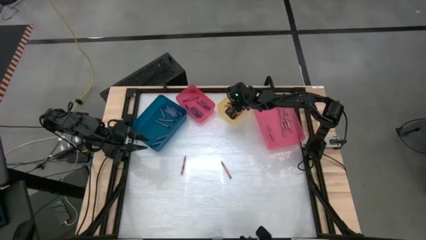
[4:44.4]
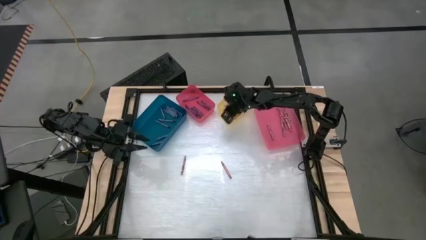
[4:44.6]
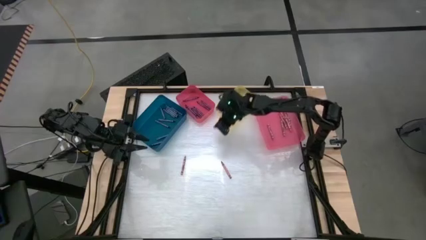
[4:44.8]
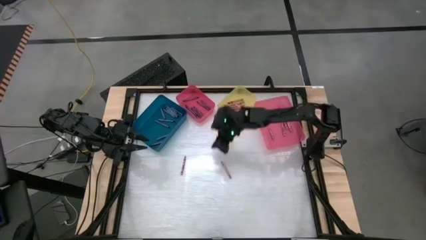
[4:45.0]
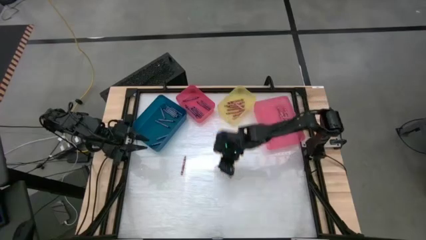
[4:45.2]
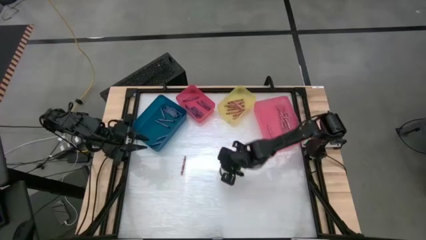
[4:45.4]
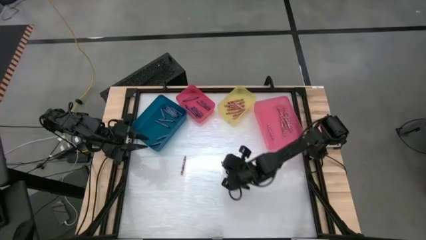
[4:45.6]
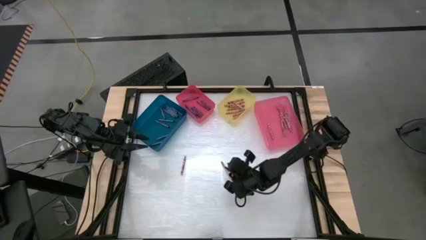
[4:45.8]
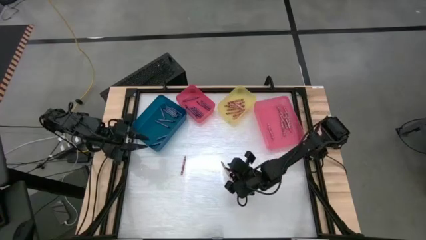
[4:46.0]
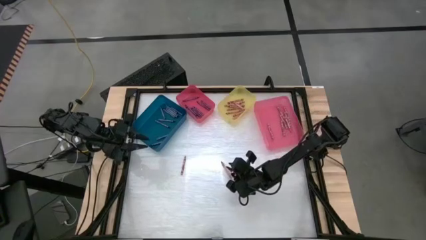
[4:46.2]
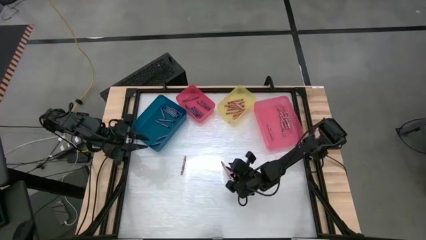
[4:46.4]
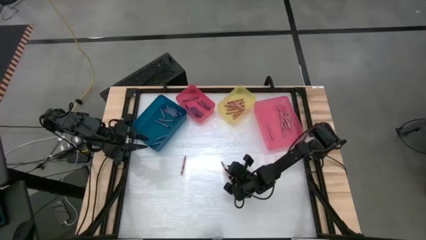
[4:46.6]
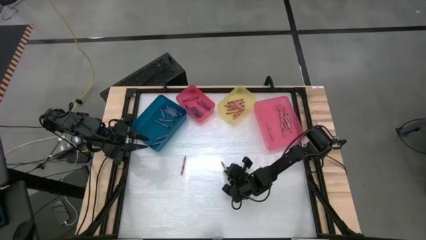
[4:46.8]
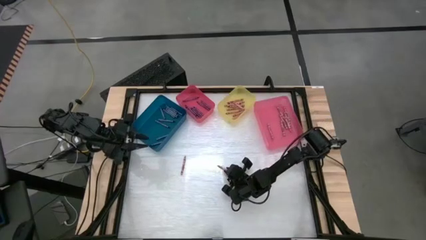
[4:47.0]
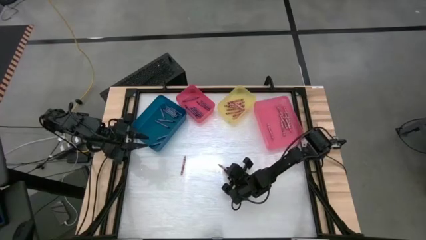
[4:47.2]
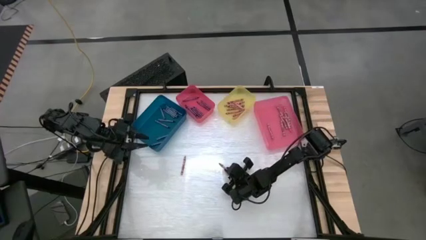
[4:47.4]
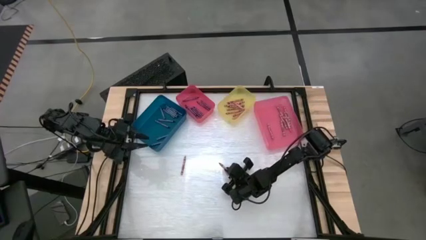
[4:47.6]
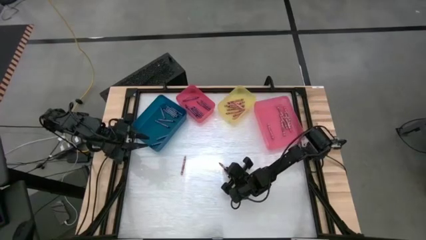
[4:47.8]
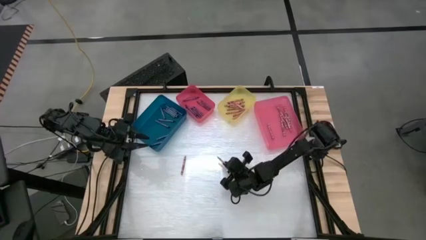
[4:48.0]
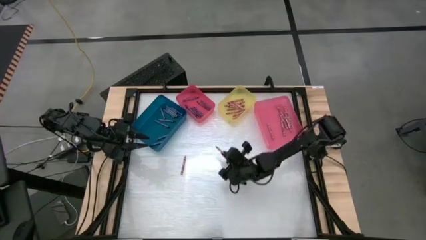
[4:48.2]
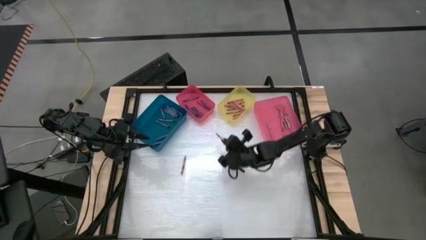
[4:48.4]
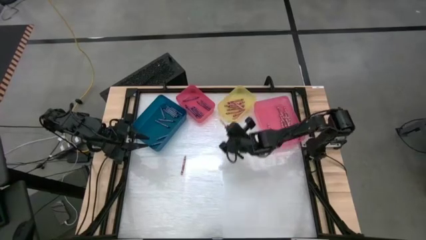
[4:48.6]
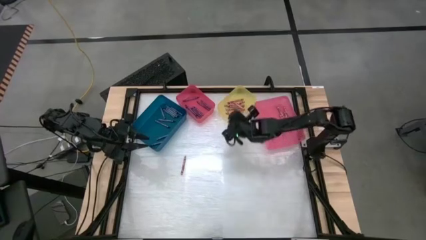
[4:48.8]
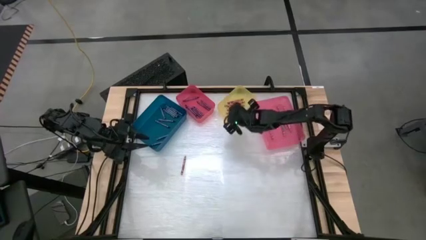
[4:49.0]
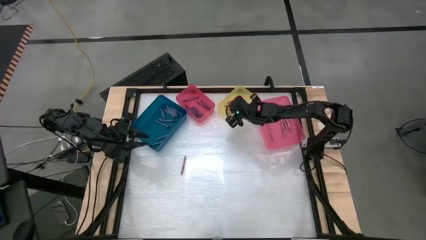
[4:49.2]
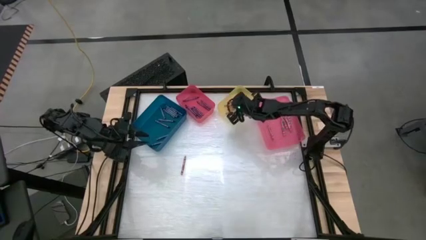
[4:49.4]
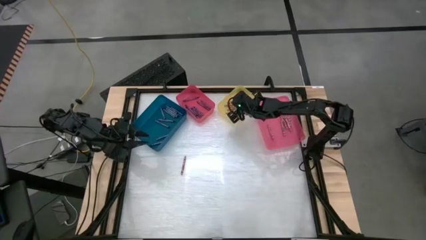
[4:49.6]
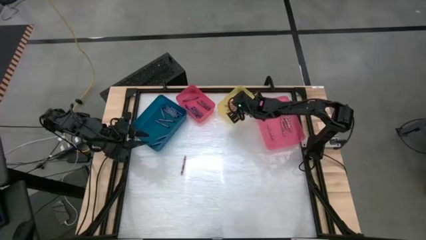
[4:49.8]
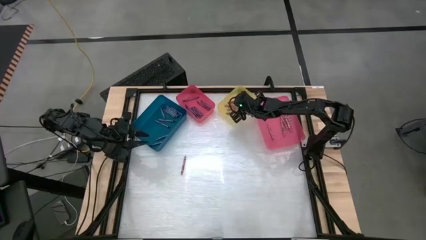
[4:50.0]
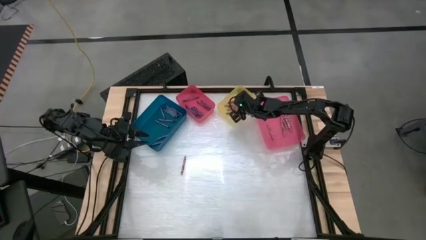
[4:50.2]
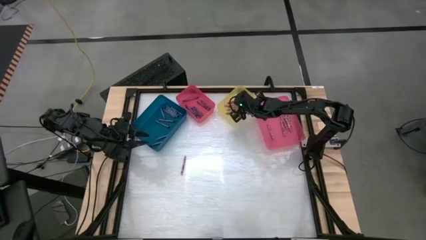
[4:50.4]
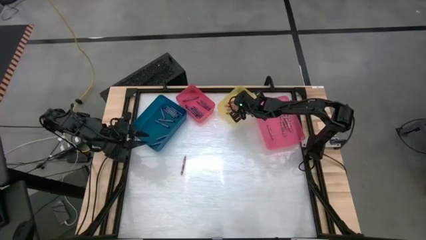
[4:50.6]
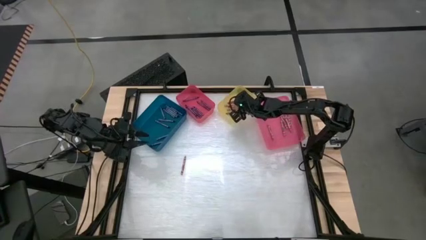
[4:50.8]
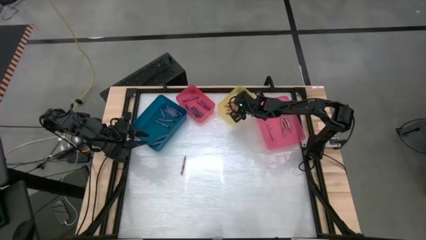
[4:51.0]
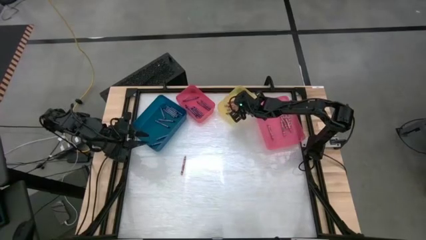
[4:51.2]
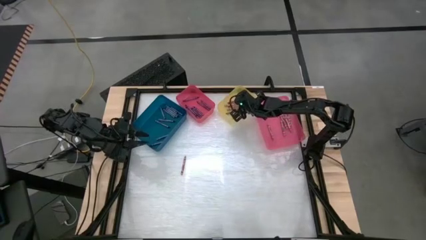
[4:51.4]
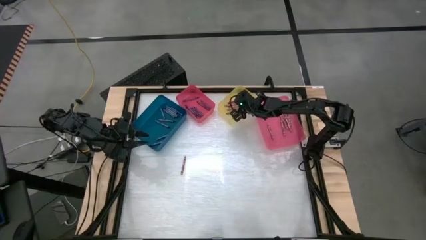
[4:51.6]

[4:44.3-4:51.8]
Task: Sort crayons
Put the red crayon into the yellow bin

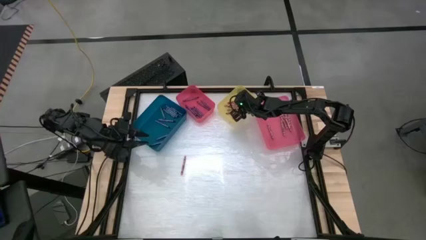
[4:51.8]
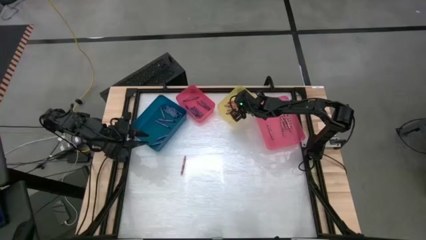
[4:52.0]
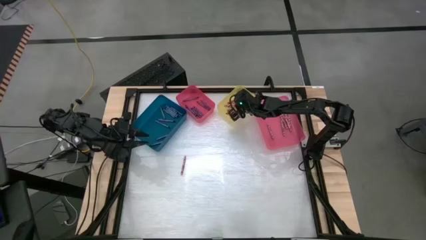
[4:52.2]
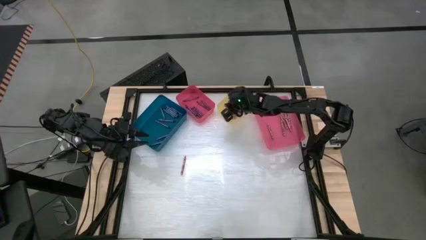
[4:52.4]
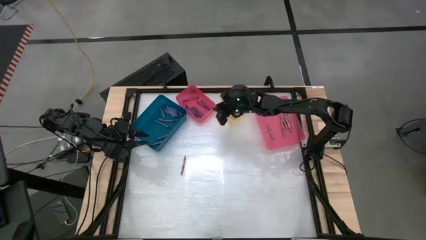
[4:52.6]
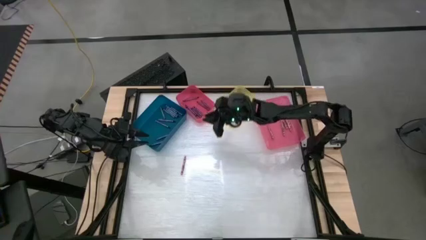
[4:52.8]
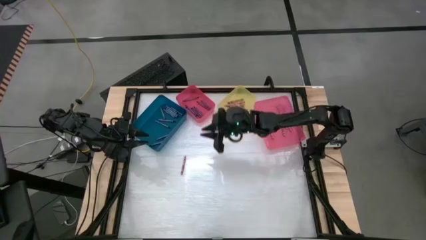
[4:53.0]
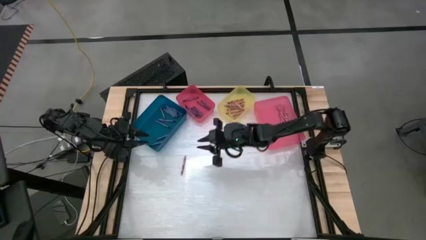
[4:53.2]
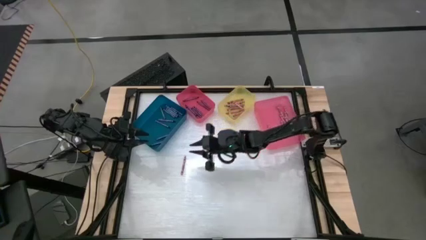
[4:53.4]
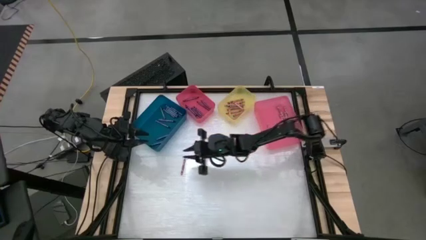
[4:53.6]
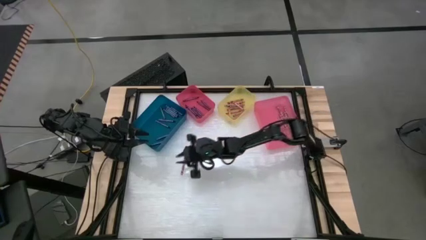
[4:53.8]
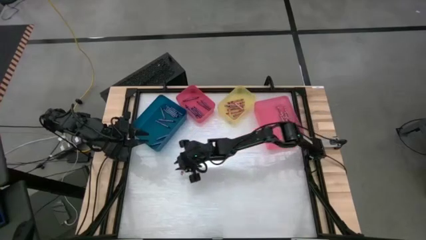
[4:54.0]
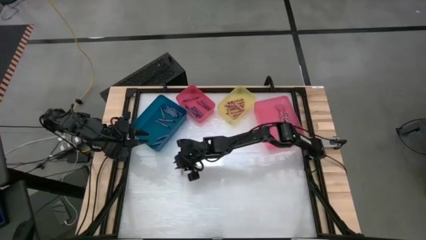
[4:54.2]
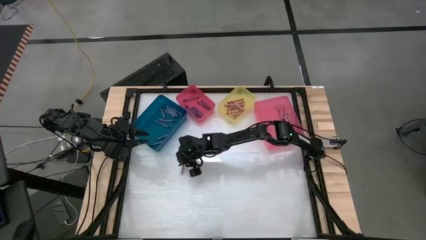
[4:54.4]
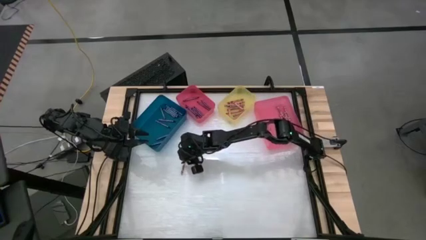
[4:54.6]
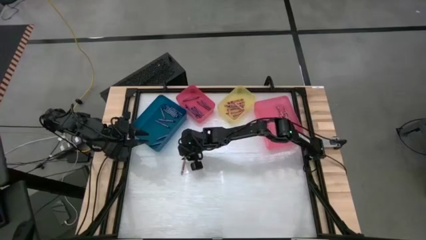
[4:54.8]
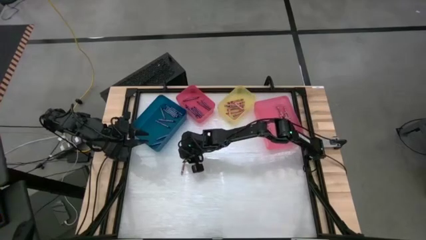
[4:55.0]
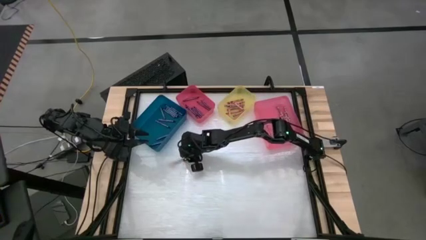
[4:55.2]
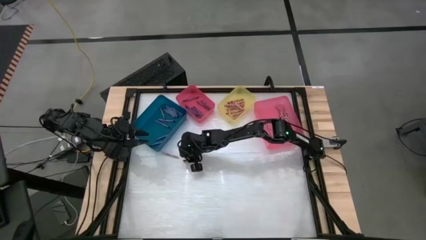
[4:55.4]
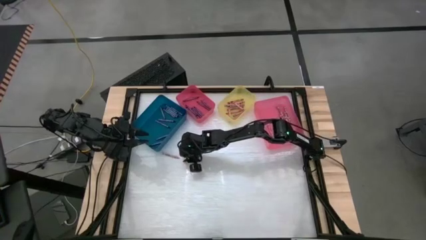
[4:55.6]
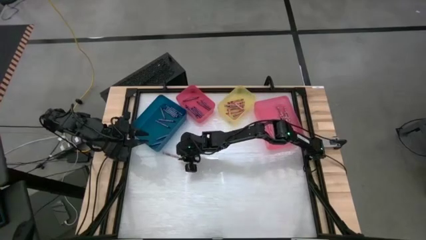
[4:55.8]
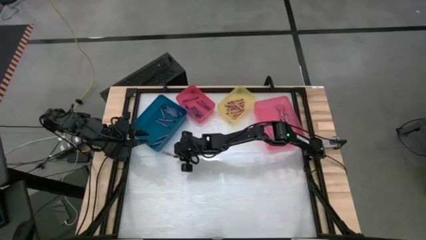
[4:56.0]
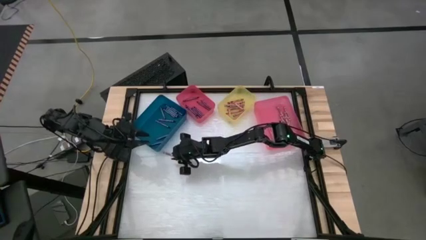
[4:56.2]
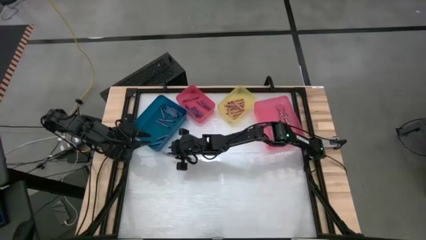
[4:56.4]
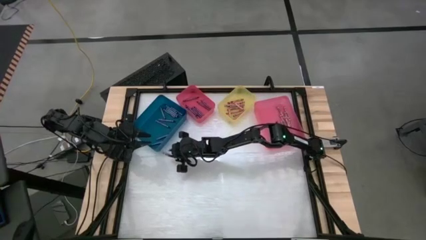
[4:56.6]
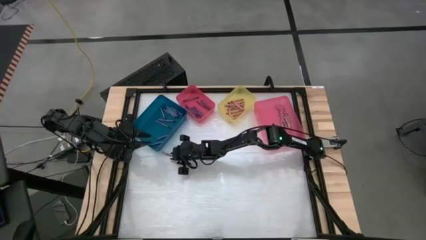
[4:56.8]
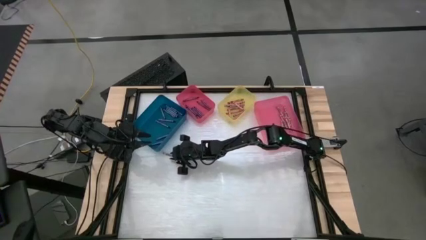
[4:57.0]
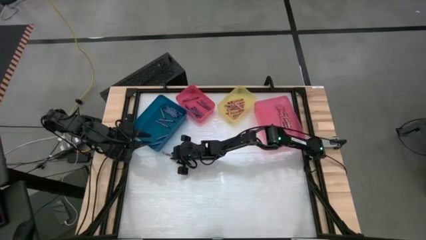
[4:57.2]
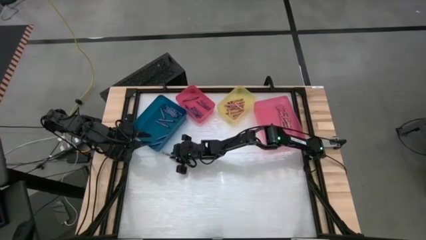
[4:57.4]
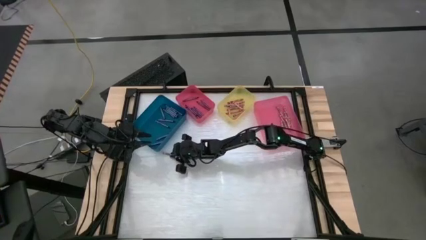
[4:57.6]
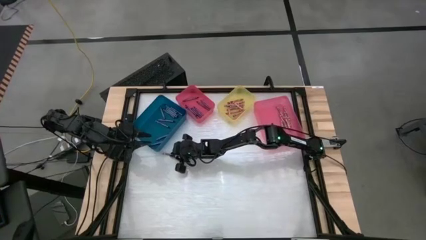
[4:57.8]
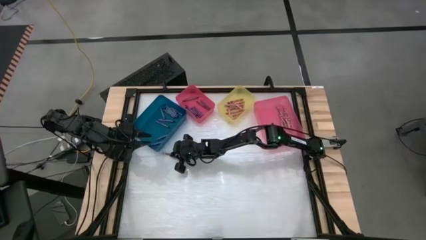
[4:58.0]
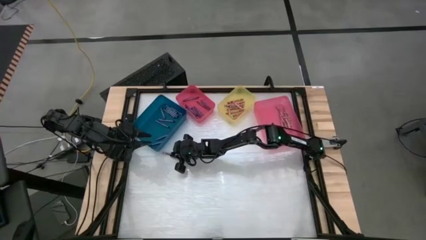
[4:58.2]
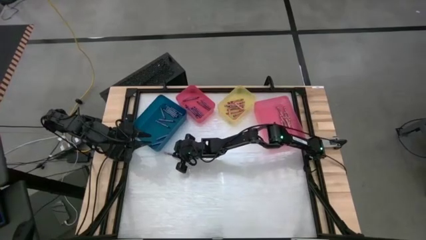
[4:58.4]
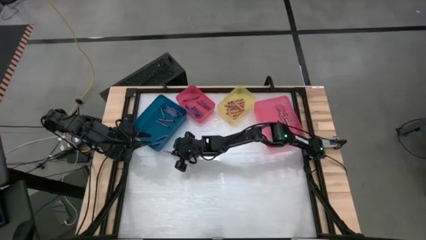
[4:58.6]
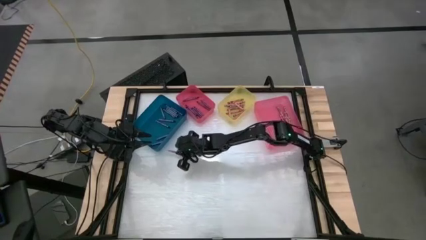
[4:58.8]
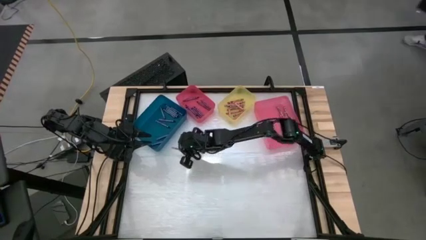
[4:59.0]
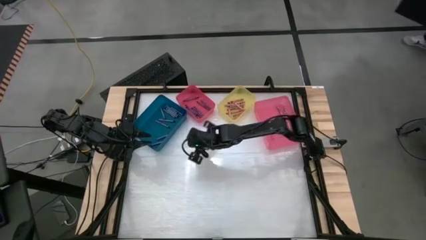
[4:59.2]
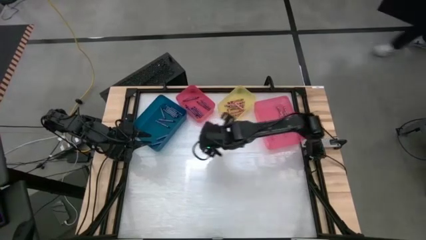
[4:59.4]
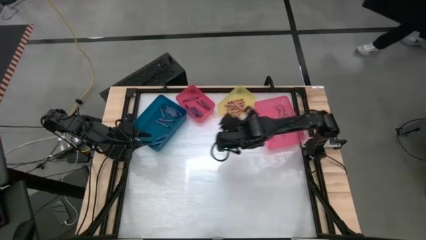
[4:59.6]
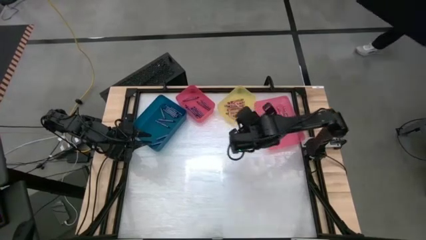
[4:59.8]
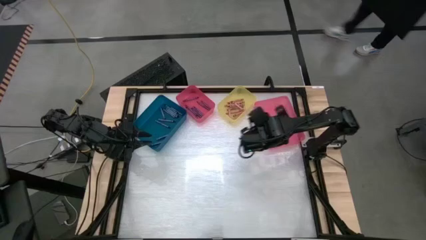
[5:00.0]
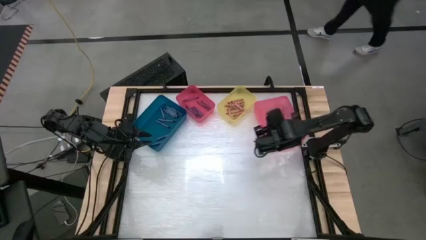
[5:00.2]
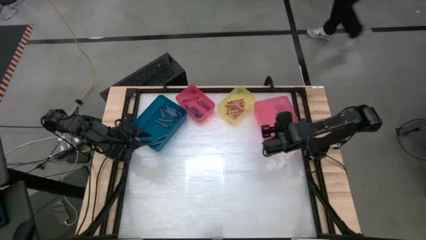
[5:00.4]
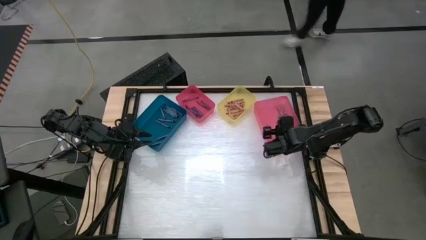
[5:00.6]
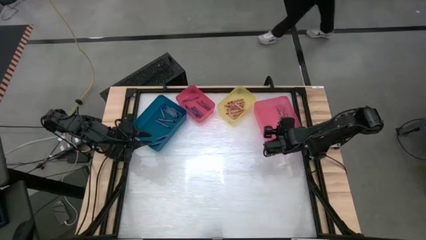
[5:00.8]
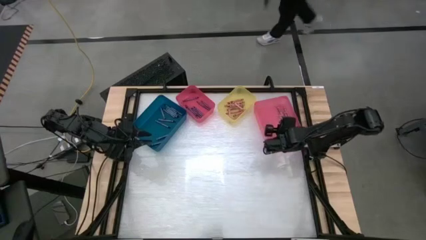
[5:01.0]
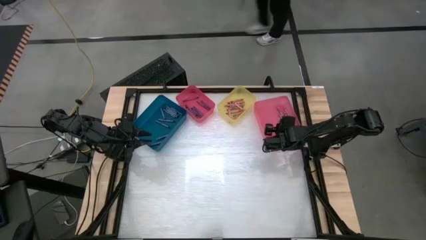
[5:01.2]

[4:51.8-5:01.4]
Put the pink crayon into the pink bin
